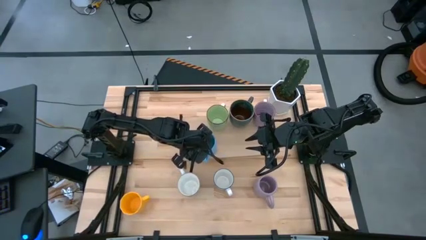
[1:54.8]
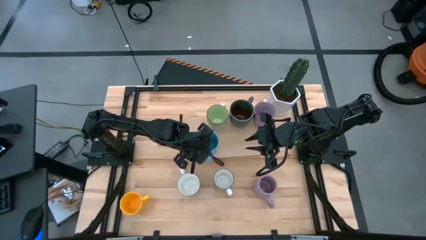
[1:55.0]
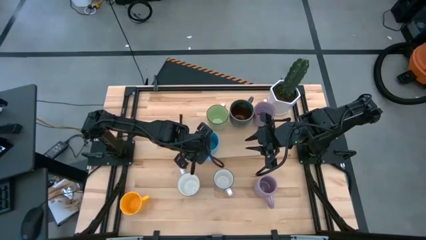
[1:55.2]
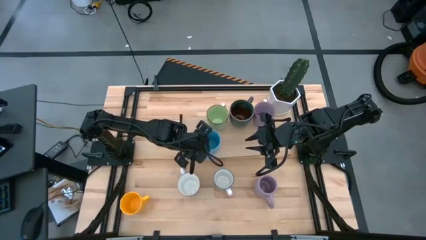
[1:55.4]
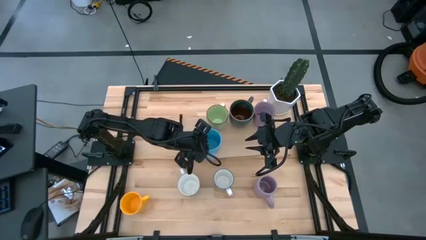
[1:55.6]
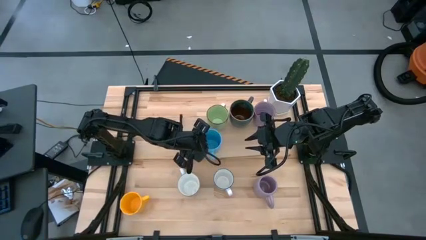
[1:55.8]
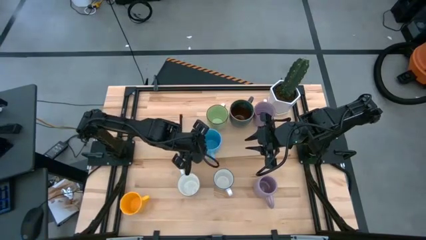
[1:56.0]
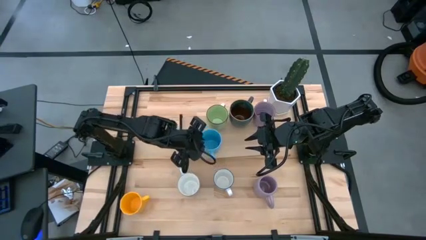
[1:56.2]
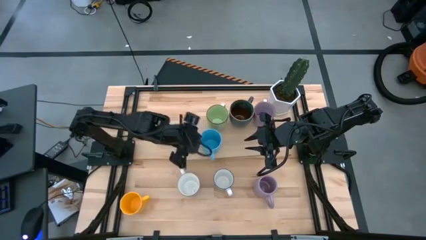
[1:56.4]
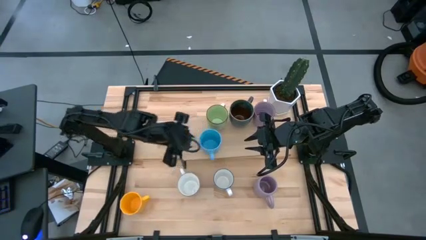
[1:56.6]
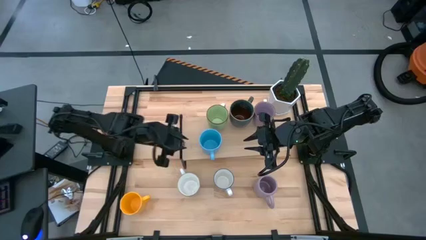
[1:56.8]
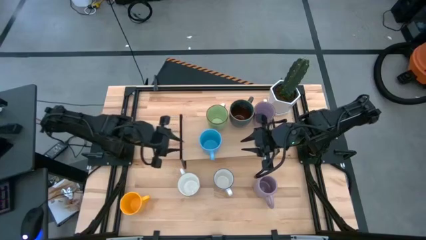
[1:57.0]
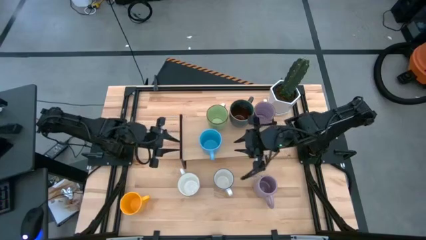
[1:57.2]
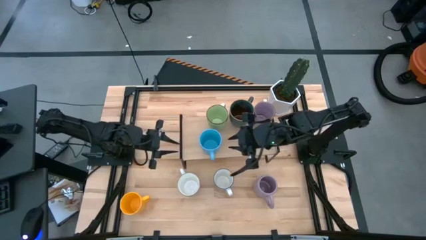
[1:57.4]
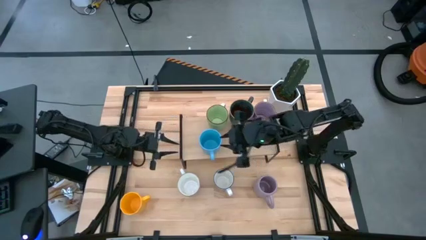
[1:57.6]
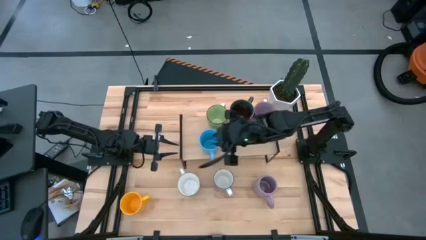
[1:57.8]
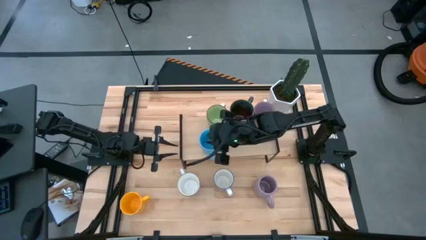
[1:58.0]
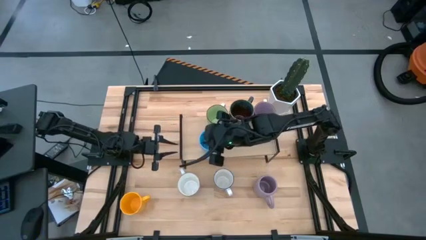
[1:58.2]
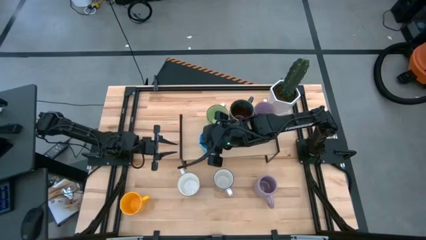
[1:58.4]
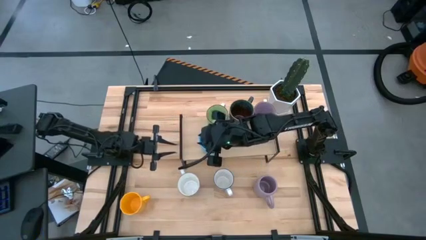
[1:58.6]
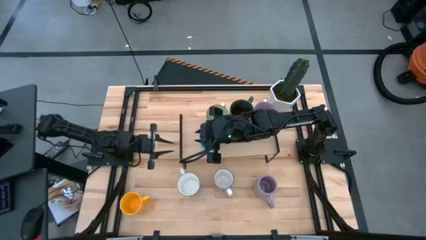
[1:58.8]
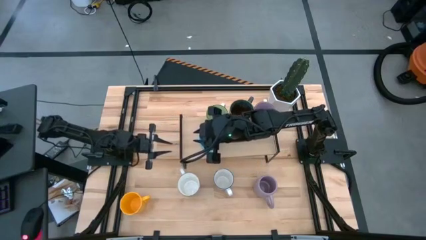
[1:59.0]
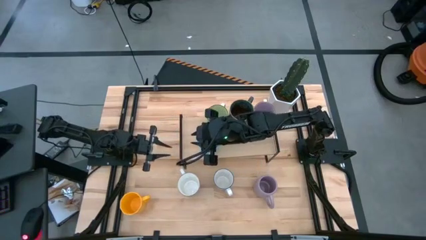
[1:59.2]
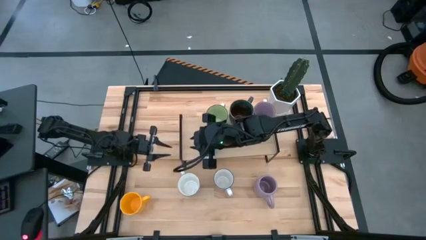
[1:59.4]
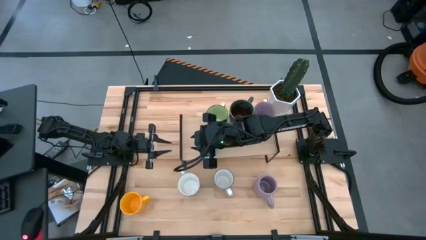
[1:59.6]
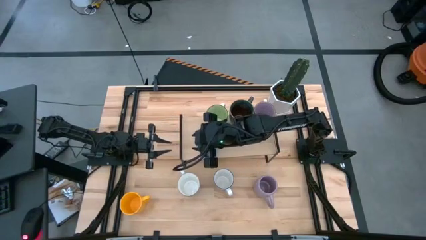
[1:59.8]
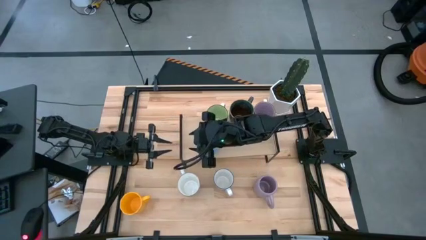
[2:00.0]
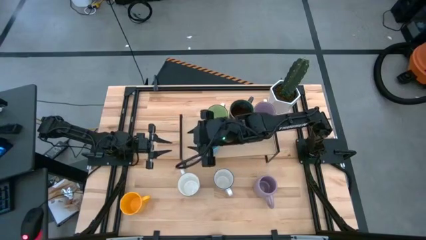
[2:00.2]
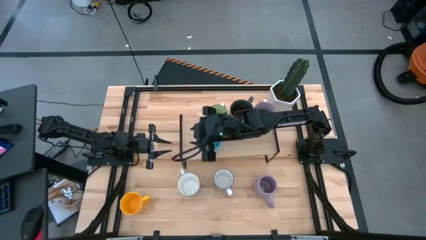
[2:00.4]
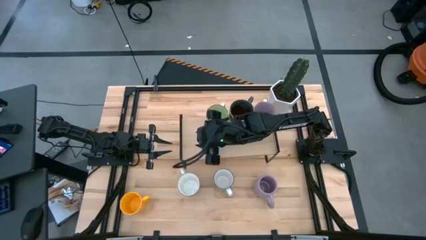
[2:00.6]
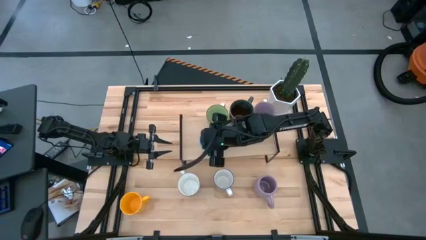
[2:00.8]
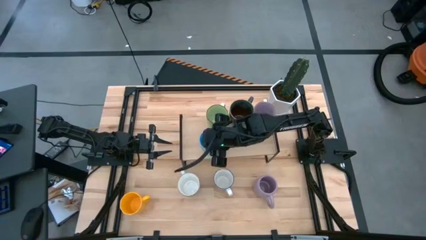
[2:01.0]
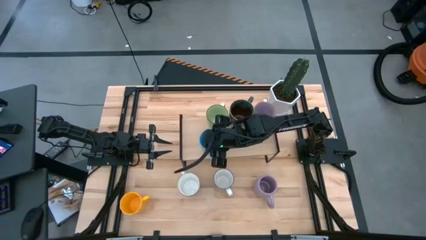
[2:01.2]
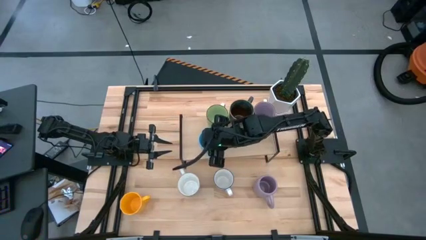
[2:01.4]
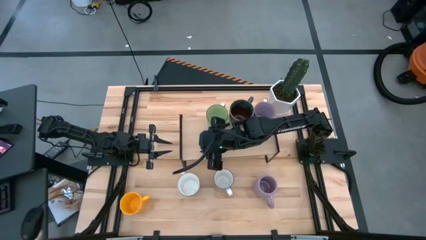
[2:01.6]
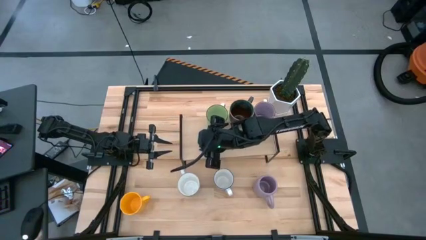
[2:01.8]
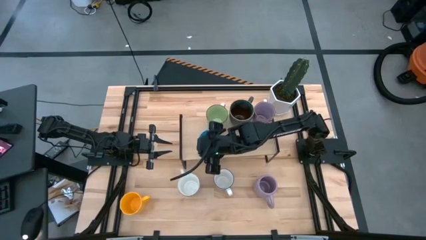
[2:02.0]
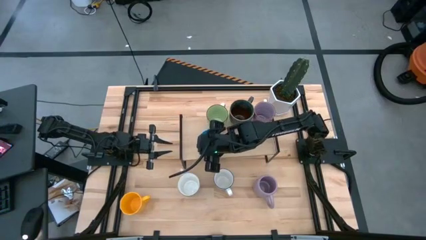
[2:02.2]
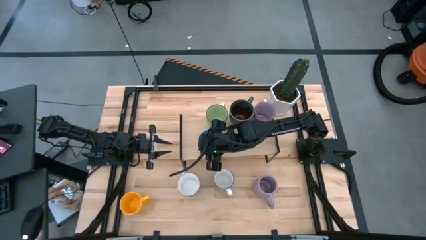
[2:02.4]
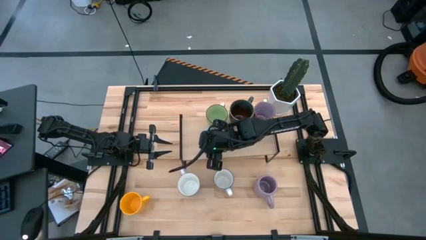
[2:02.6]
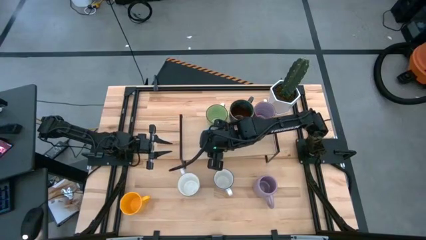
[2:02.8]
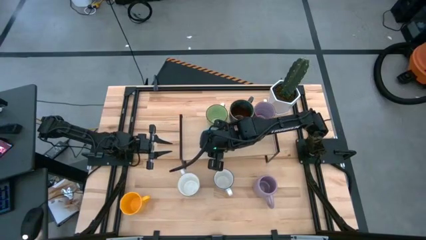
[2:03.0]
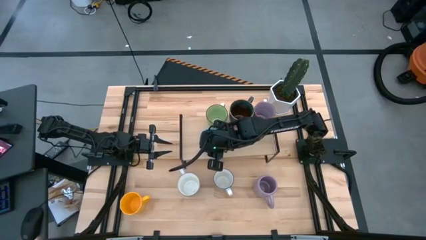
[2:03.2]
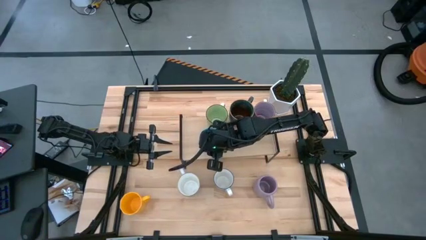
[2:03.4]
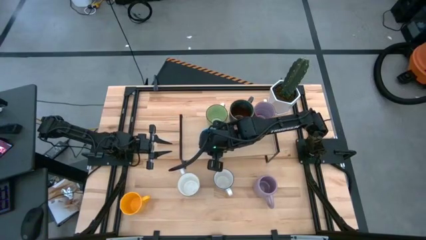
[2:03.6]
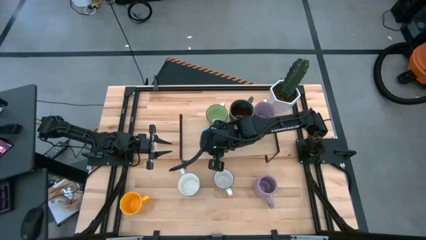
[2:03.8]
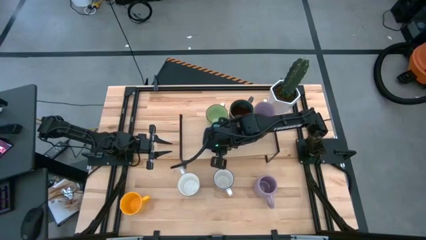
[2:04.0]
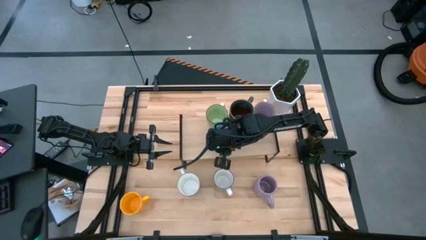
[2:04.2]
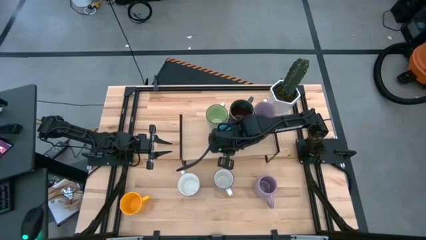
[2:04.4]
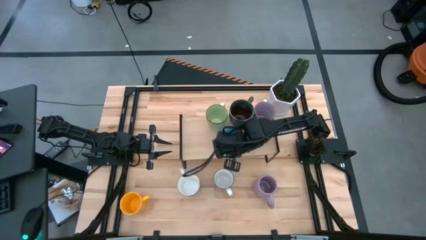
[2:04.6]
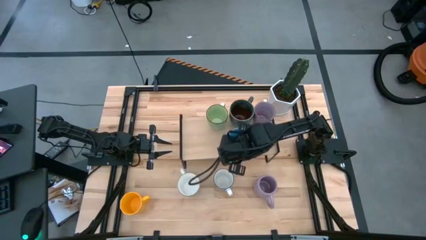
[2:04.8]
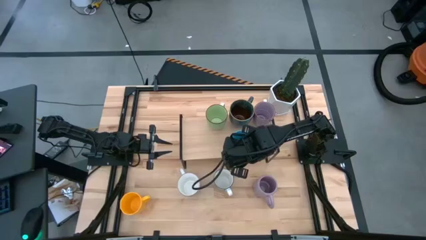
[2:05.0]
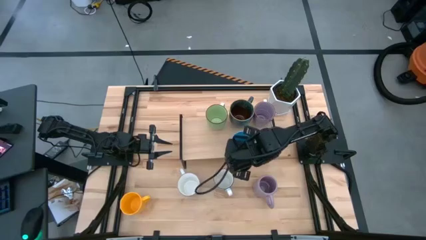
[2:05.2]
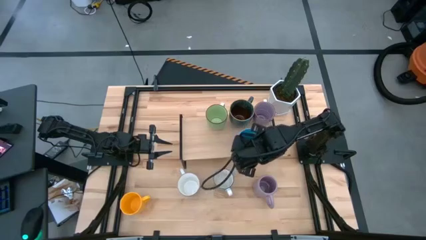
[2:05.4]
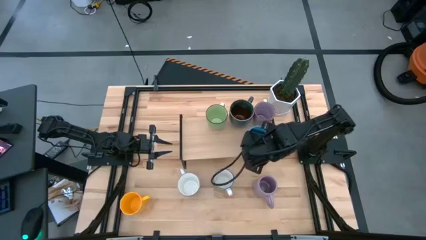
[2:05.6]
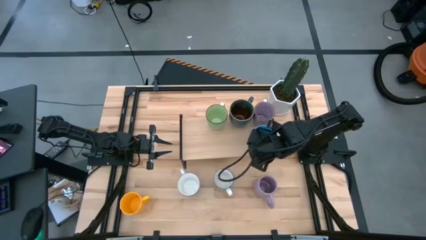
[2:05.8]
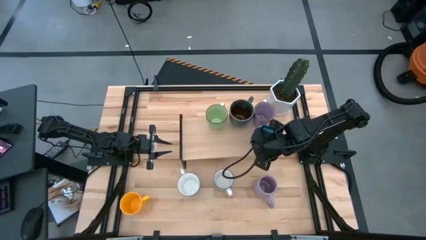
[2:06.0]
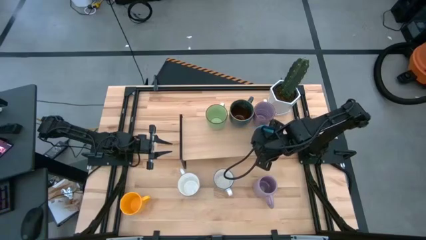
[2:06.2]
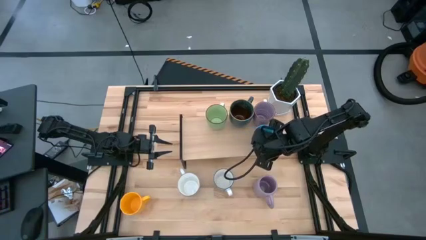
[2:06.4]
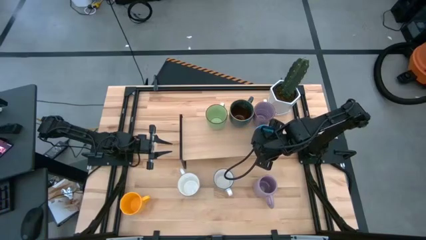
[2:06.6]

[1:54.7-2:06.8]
Task: Place coffee mugs
Put the blue mug on the shelf aligned with the other purple mug on the shelf

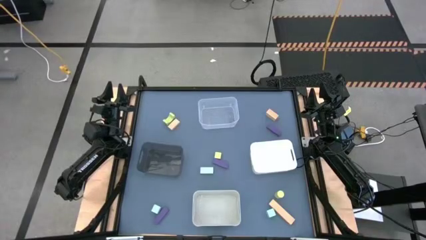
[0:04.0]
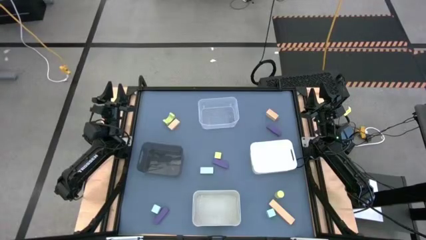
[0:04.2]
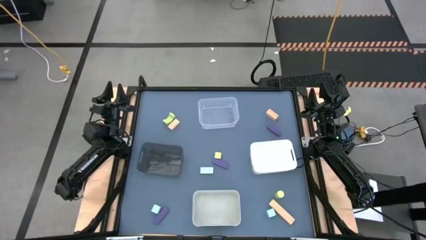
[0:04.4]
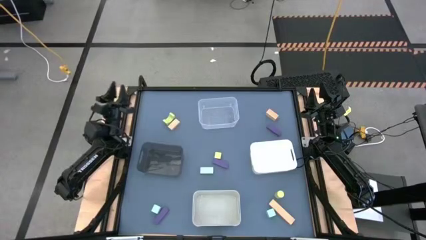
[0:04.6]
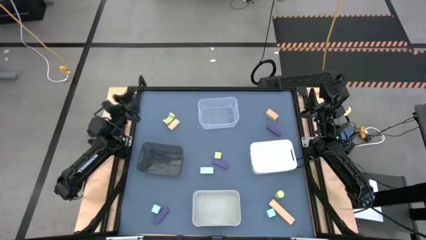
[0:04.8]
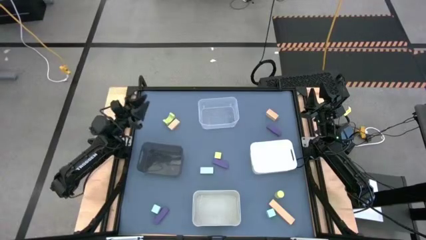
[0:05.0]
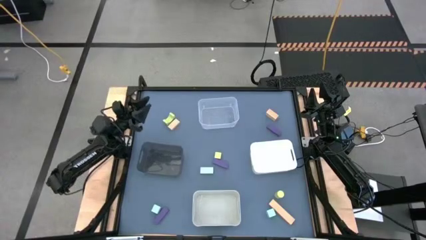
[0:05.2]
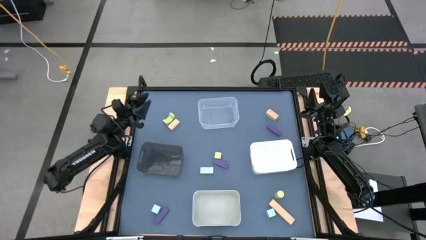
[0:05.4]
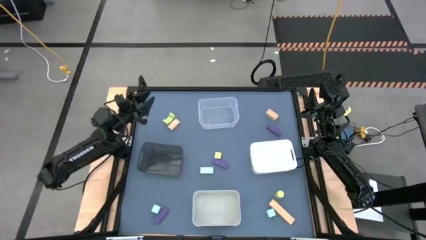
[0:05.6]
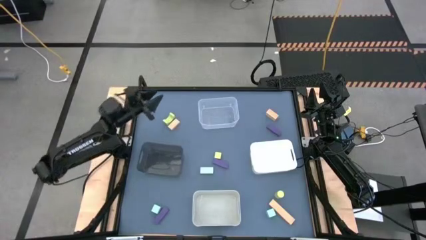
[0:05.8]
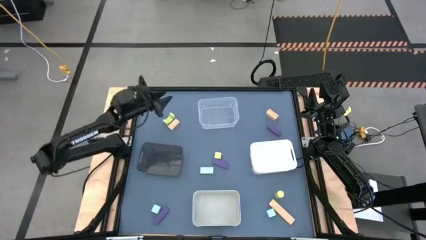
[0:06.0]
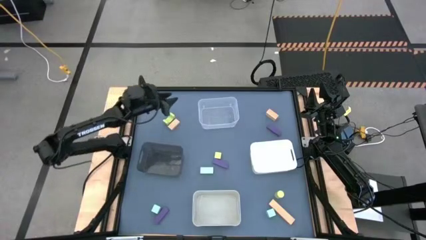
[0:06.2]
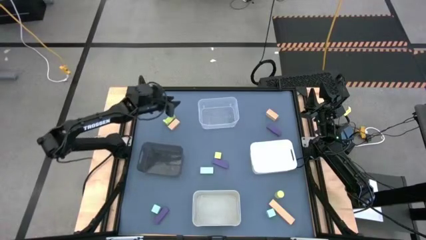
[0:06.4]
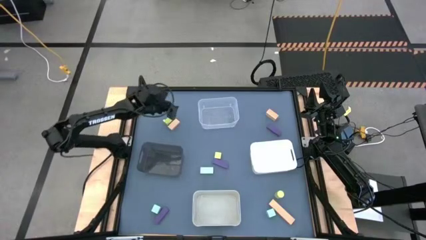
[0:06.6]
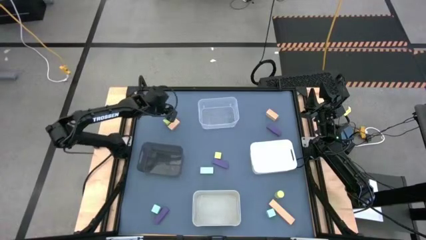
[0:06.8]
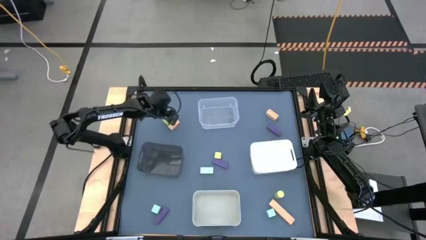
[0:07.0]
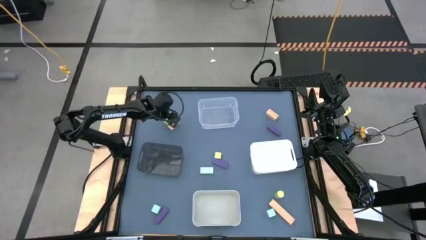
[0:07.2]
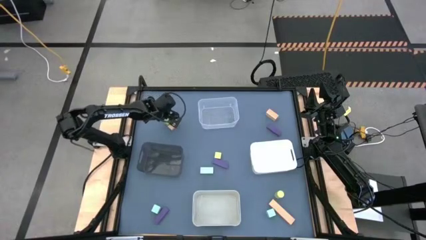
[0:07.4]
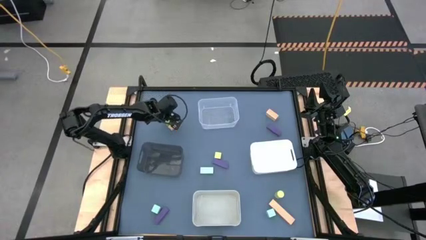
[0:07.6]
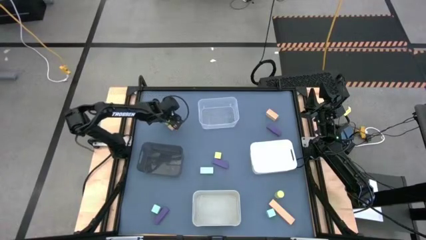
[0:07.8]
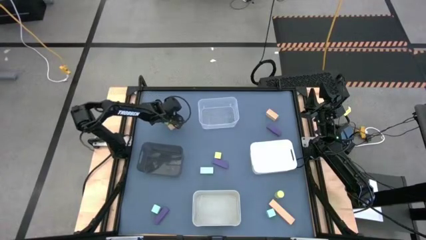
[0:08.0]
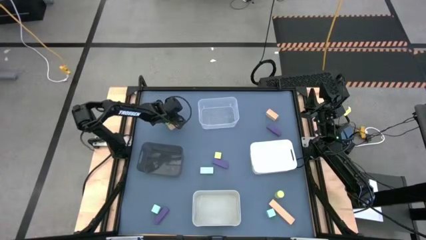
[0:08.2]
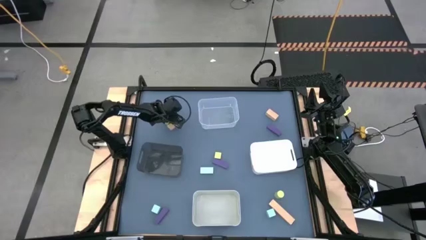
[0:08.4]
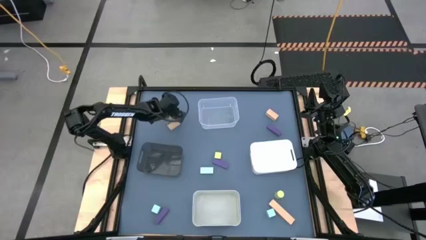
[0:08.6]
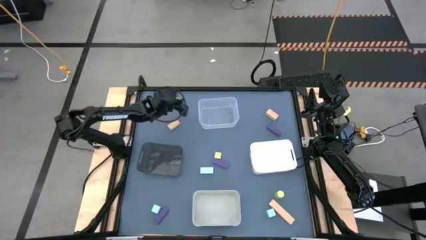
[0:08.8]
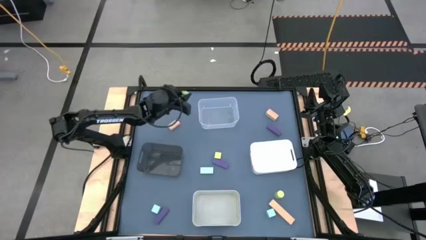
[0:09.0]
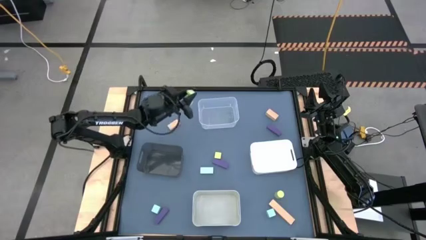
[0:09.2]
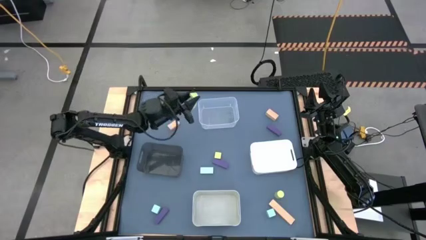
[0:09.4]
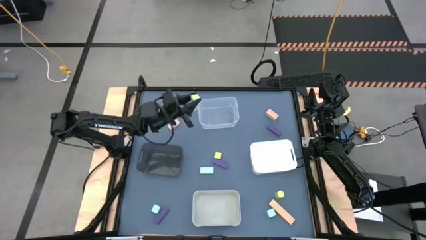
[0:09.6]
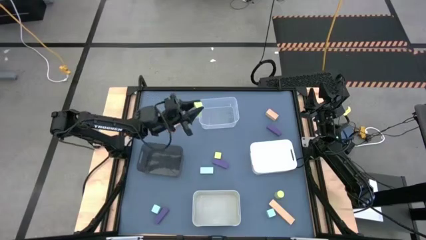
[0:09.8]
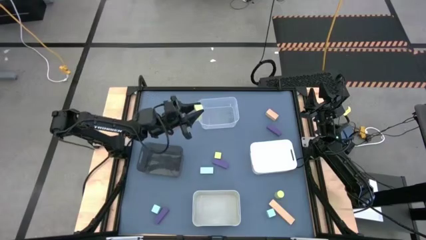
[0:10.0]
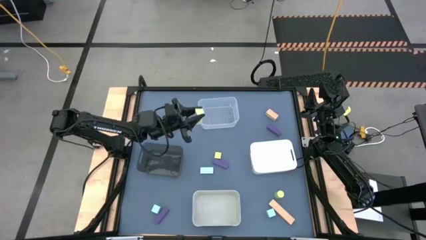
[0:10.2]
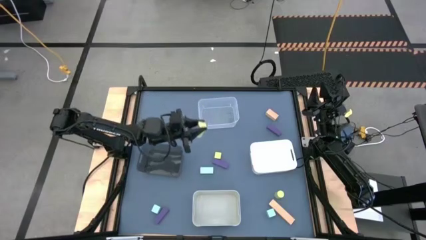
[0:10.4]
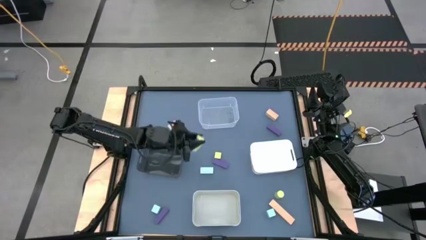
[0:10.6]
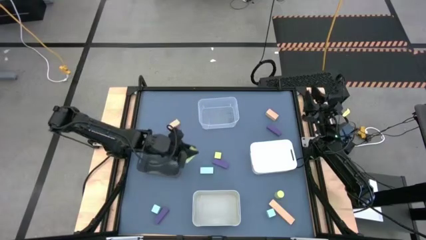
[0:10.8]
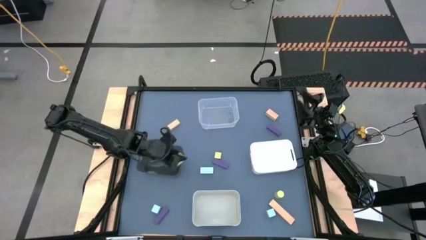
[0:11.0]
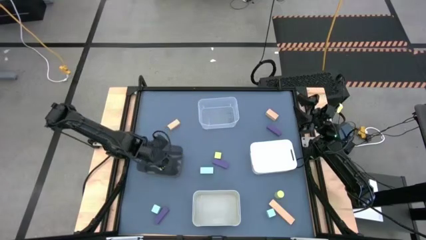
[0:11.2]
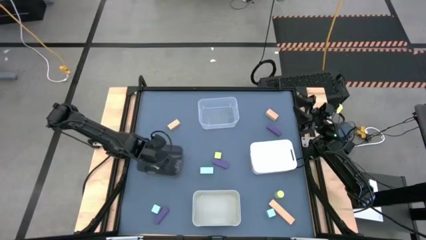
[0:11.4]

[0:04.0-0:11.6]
Task: Sort & place blocks by color
Put the top green block into the black bin
